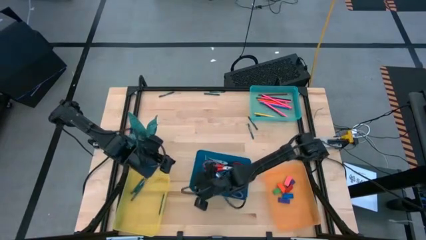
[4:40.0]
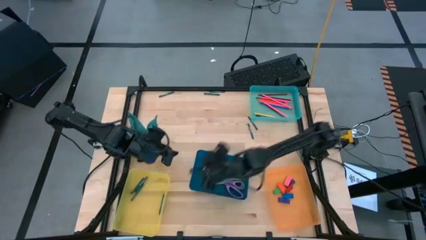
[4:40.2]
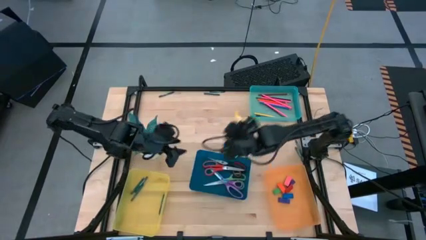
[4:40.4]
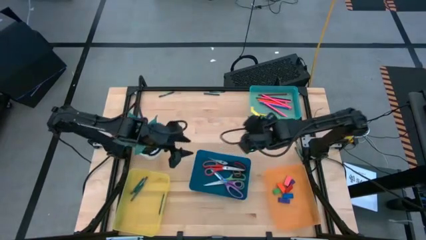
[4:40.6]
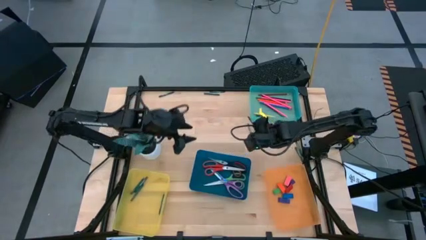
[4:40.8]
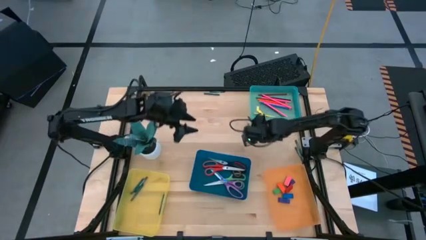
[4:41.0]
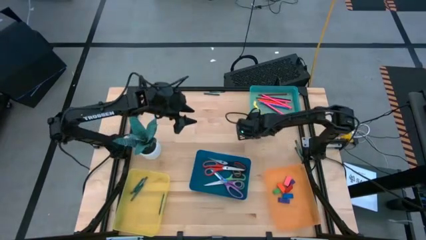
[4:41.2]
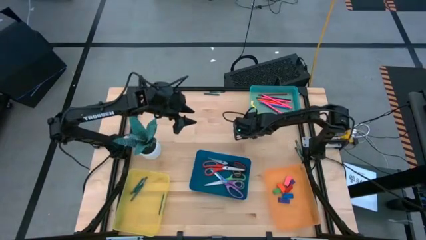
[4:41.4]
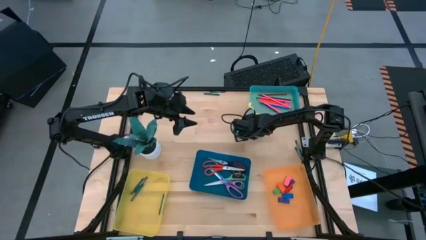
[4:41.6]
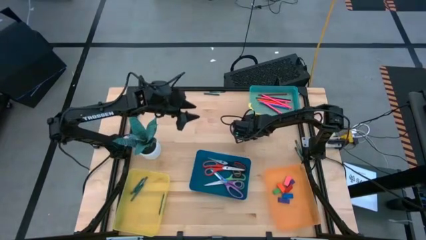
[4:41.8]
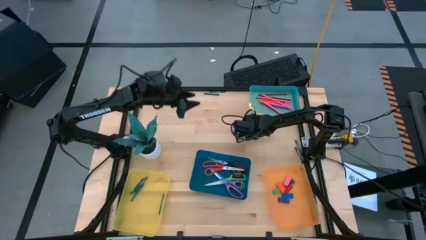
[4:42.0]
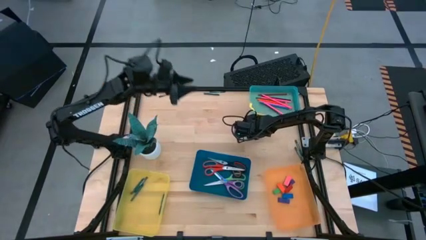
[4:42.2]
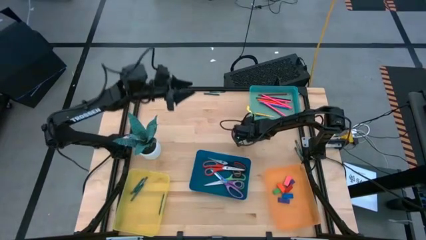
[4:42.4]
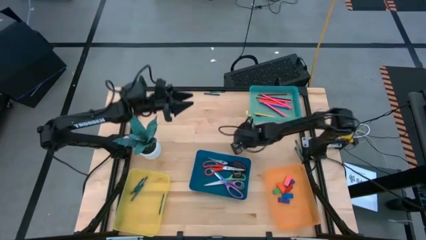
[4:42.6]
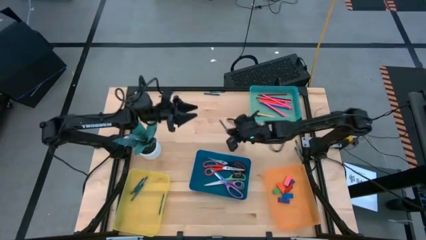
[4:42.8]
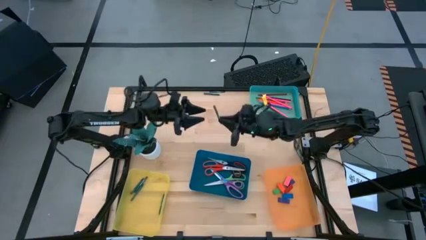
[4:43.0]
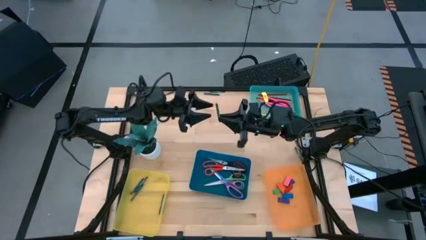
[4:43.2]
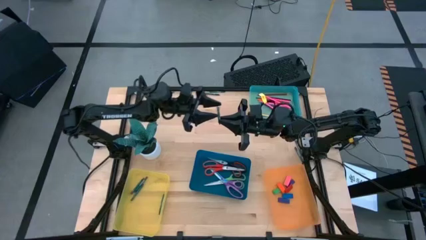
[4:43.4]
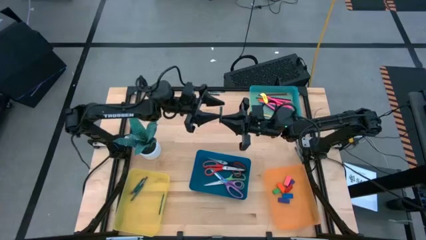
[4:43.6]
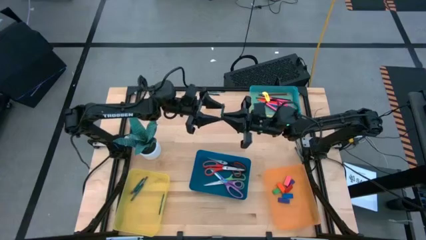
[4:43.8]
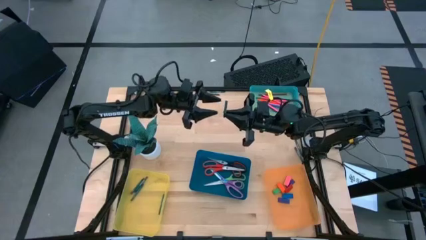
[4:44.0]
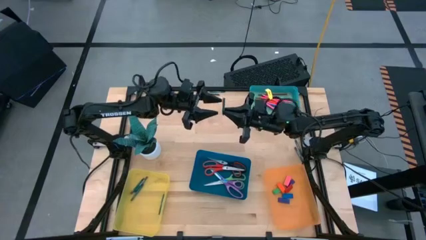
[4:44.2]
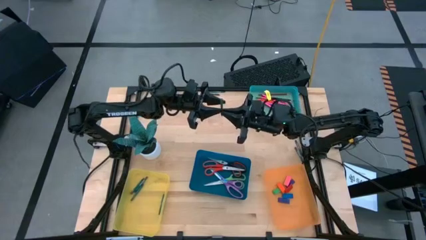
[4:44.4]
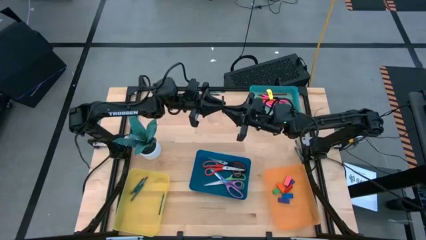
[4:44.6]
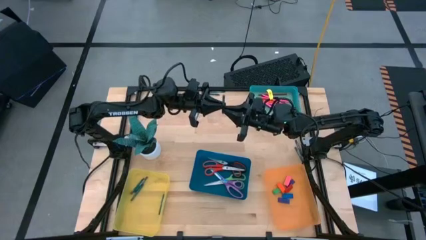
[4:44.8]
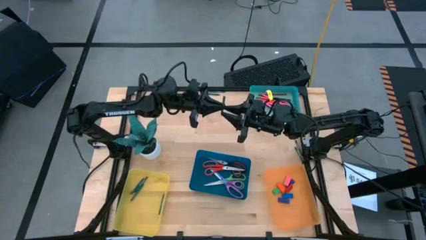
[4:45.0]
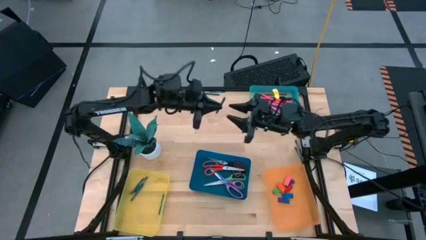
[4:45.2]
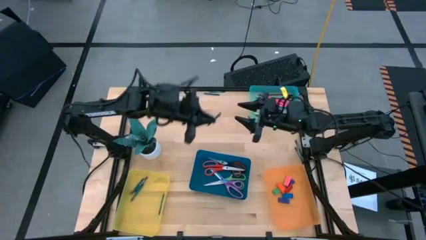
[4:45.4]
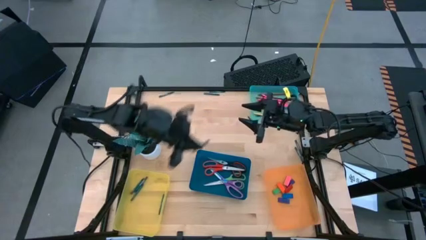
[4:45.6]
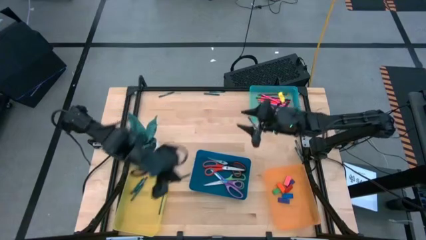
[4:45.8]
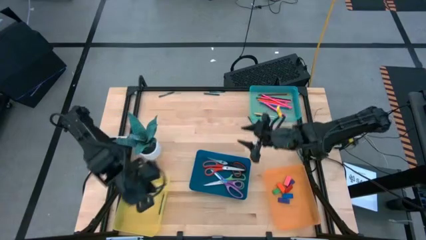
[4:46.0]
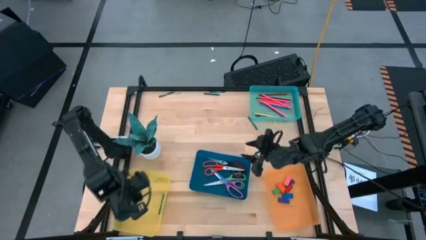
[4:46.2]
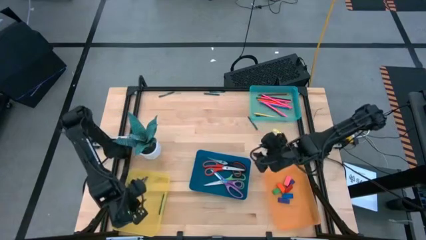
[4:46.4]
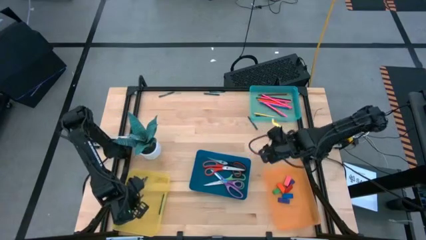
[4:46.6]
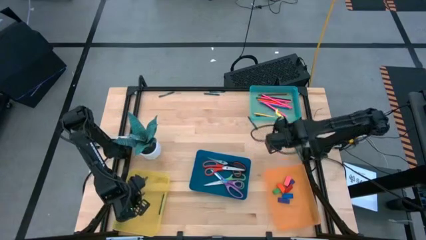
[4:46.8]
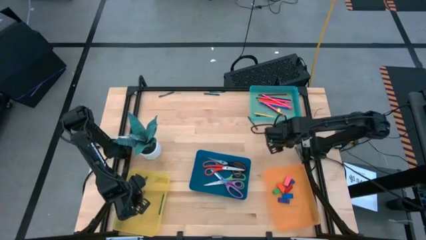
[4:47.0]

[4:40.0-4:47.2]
Task: Sort crayons/erasers/pens/pencils in bins
Put the green crayon into the yellow bin

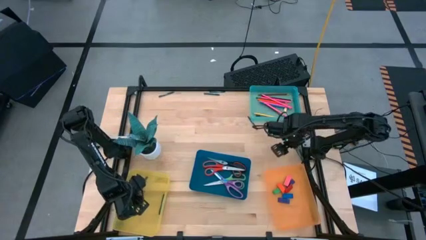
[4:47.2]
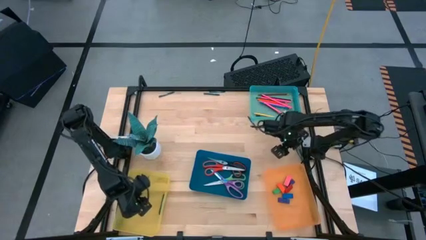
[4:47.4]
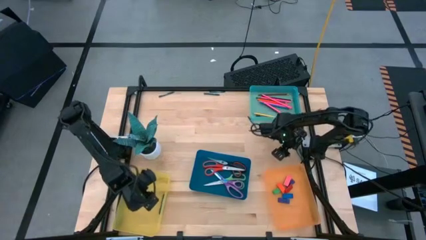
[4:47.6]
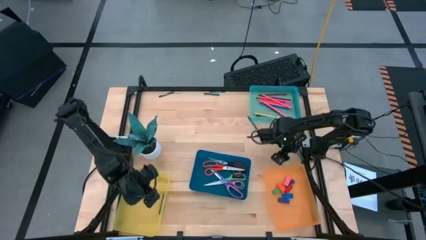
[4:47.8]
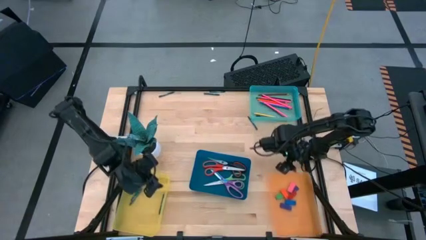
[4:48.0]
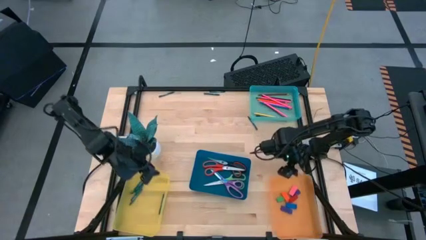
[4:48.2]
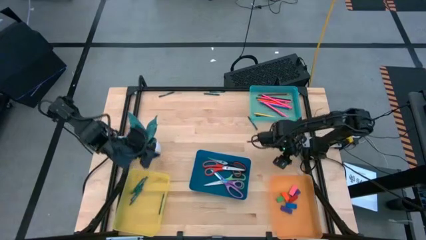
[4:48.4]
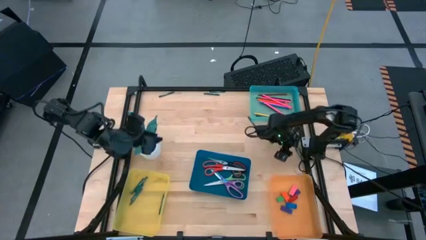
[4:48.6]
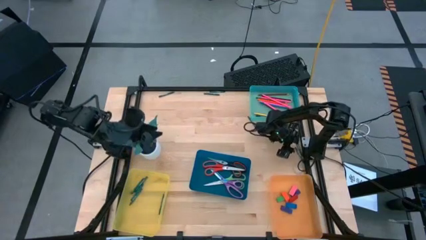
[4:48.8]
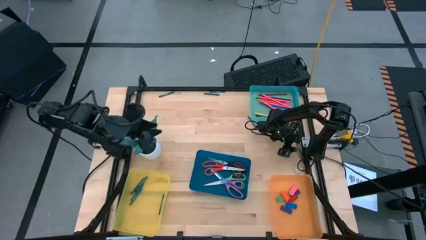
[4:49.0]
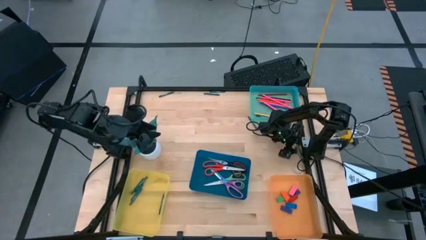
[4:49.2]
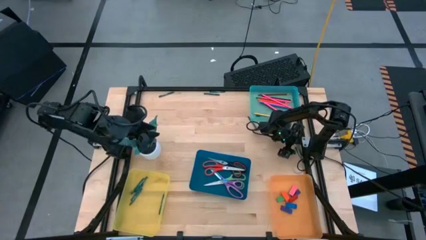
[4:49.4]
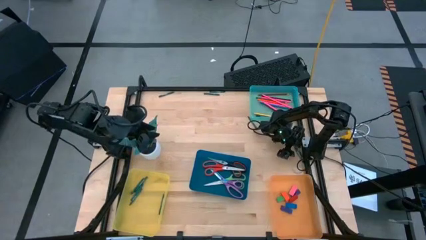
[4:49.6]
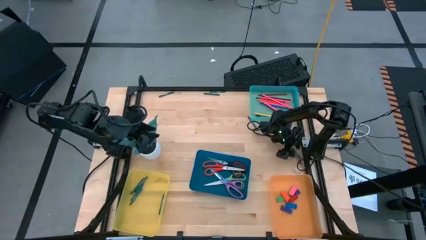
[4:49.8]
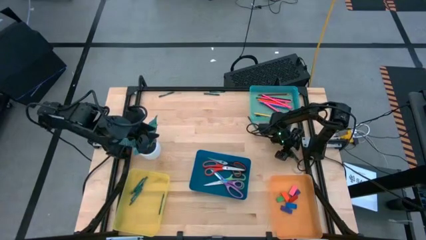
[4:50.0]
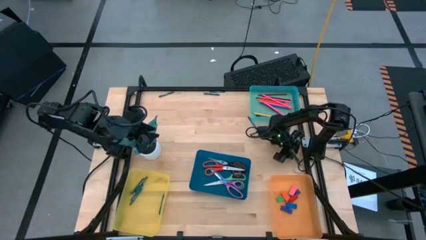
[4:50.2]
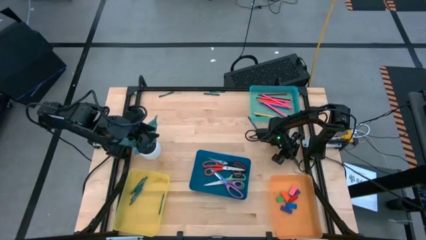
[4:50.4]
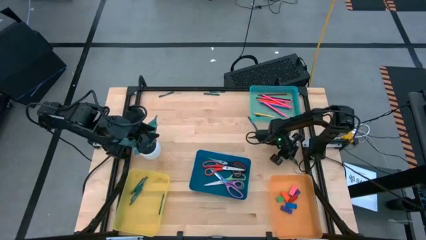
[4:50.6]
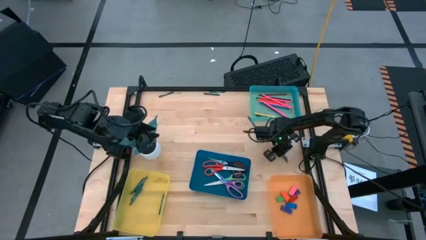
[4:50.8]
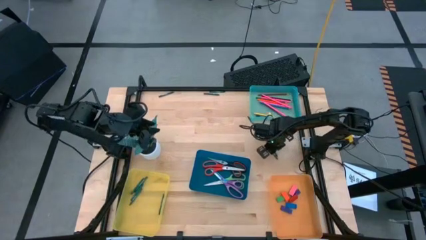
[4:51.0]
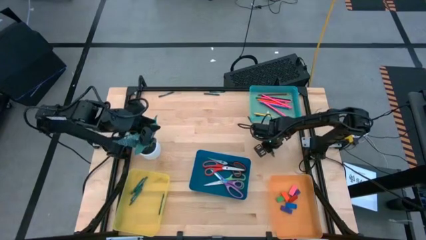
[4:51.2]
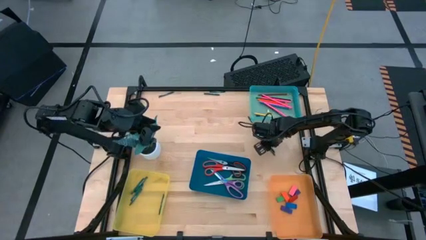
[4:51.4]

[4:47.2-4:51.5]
Put the green crayons into the yellow bin

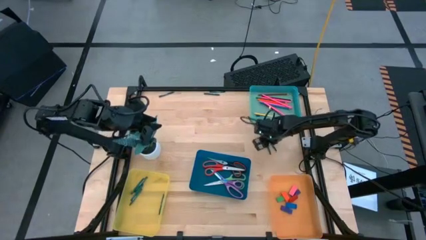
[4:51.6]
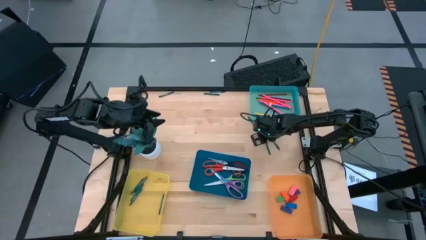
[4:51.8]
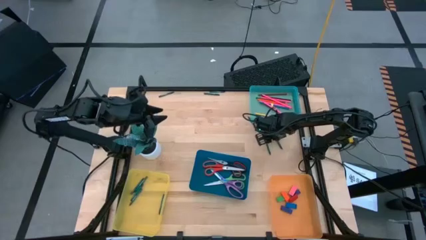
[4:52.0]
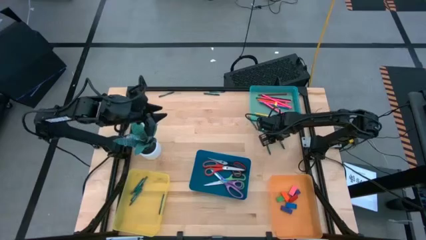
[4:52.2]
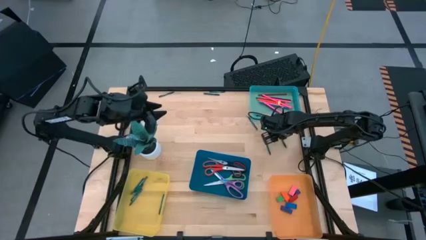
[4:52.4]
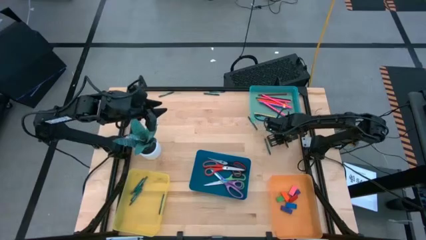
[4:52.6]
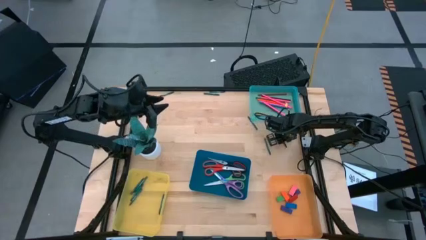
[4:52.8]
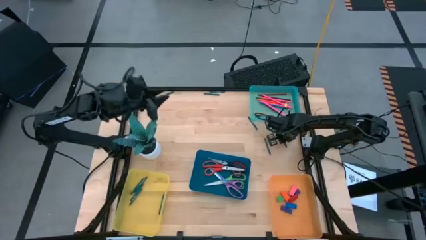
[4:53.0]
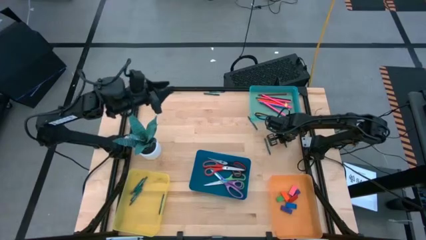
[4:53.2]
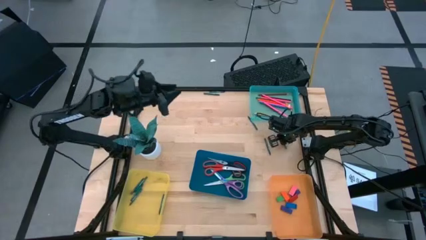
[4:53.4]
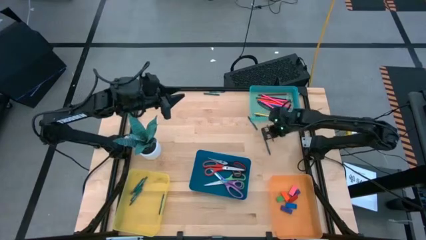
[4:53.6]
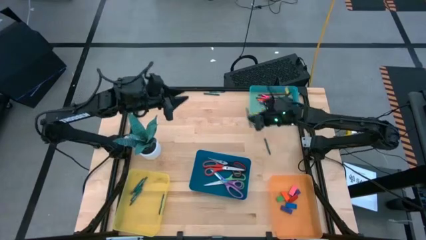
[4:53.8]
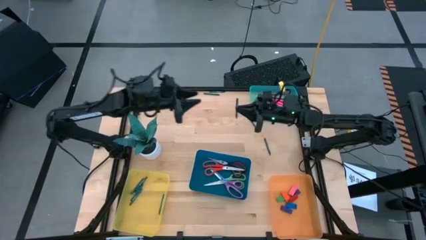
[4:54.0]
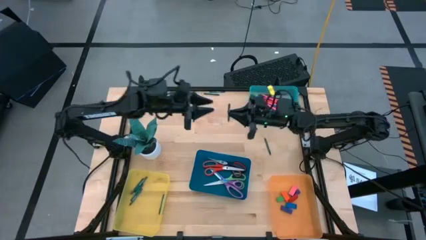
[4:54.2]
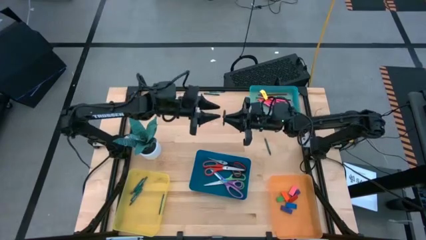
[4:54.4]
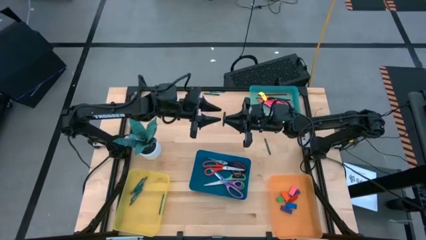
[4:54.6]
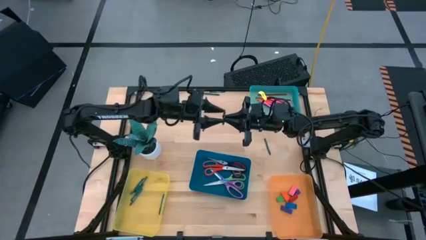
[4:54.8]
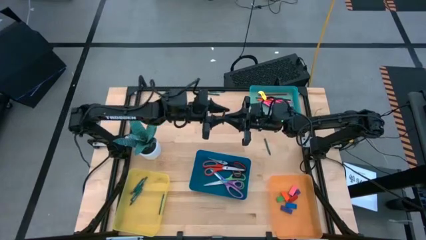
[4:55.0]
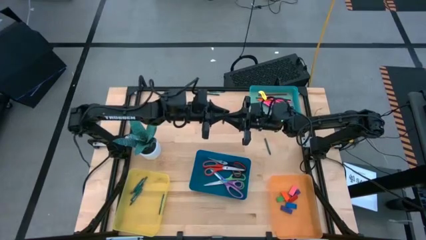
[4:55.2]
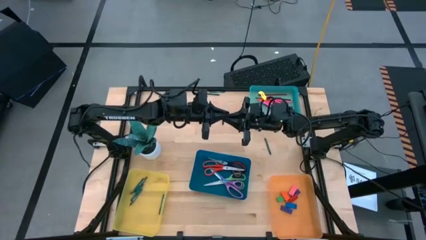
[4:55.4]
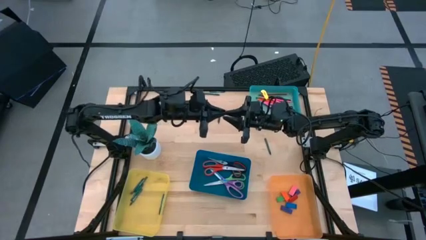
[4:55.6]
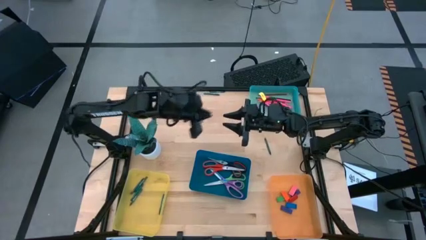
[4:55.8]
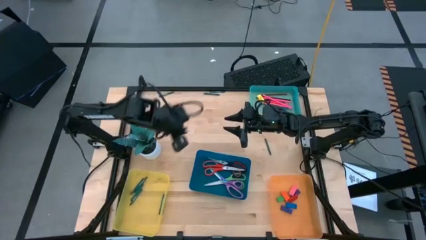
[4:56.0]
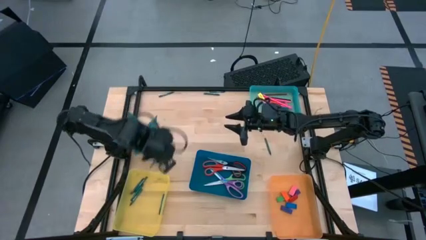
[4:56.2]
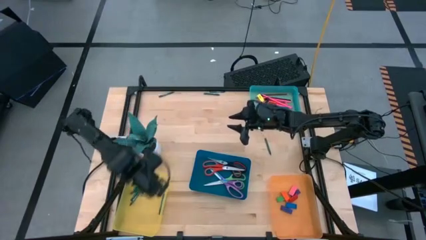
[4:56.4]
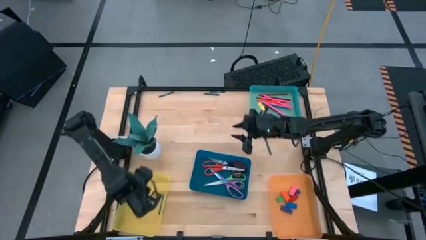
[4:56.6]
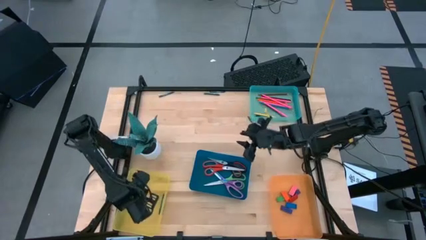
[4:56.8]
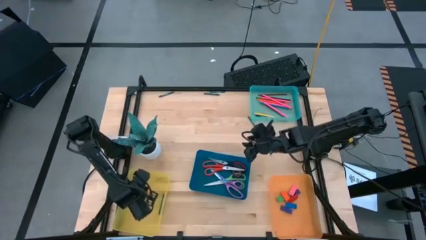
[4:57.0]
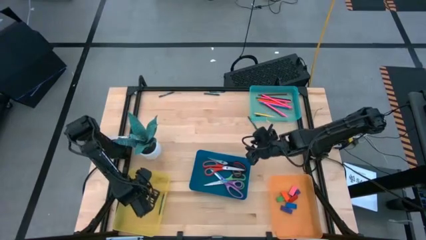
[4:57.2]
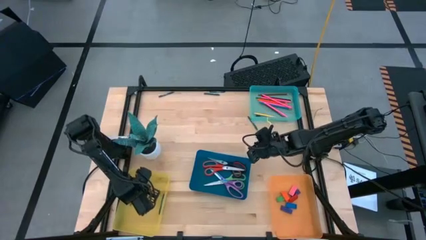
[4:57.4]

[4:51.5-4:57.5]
Put the green crayon into the yellow bin
